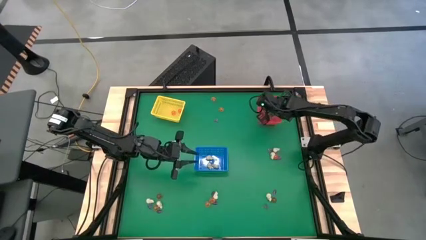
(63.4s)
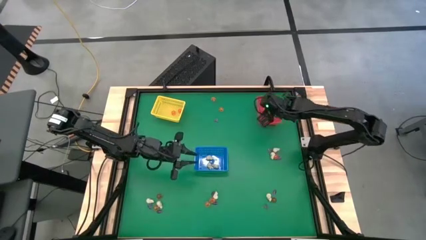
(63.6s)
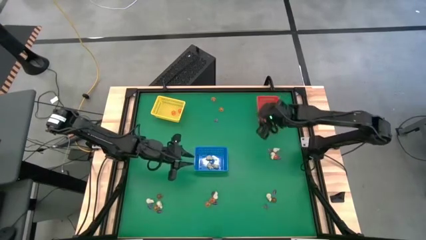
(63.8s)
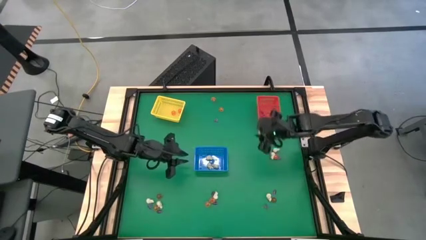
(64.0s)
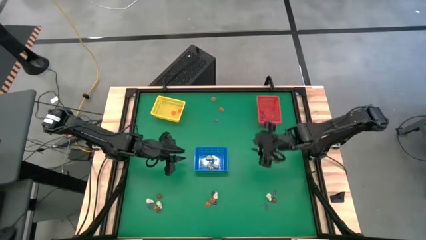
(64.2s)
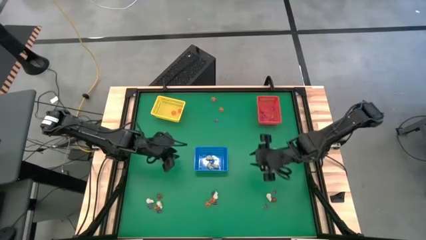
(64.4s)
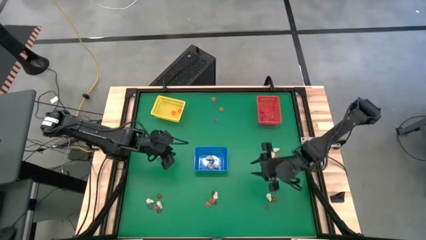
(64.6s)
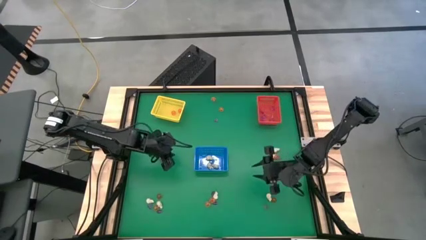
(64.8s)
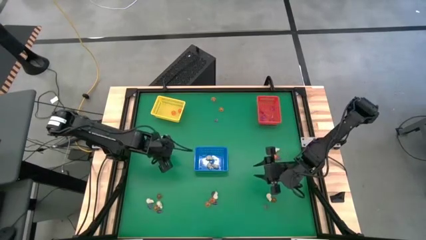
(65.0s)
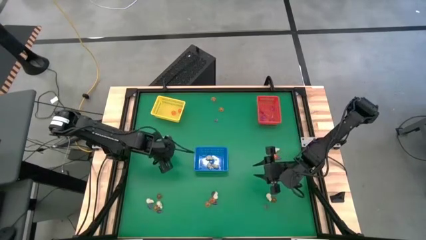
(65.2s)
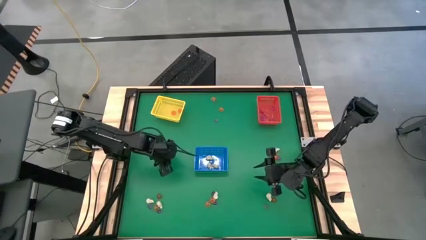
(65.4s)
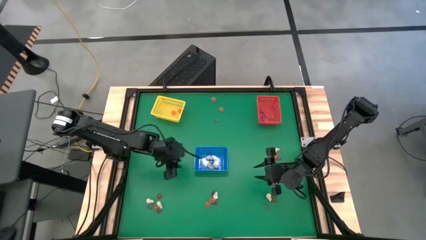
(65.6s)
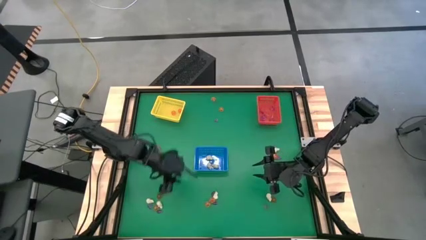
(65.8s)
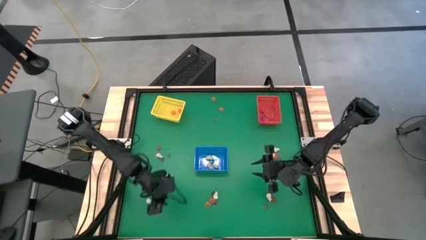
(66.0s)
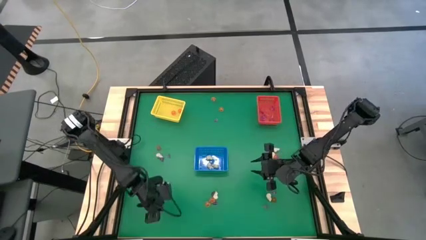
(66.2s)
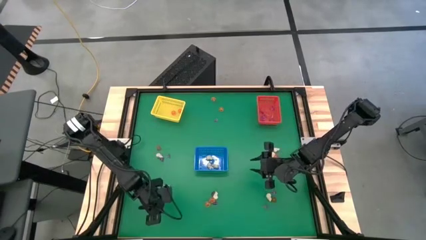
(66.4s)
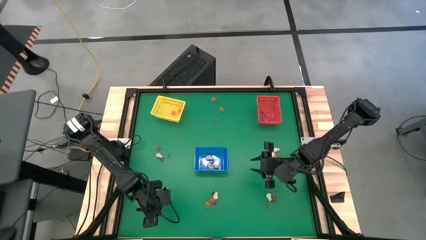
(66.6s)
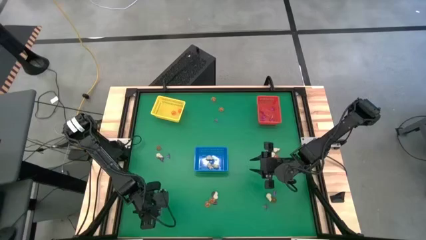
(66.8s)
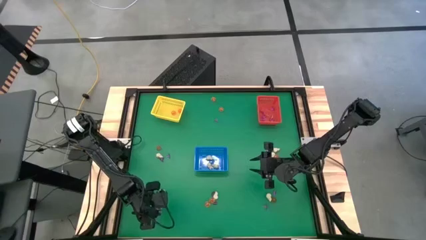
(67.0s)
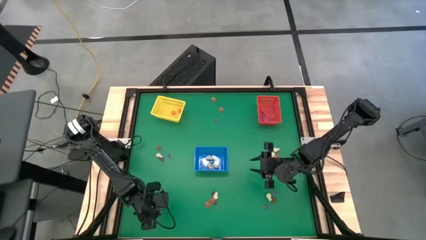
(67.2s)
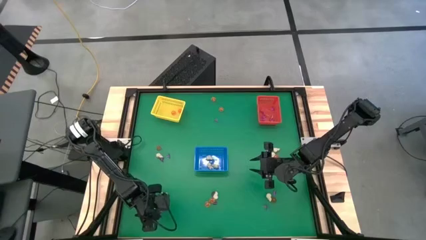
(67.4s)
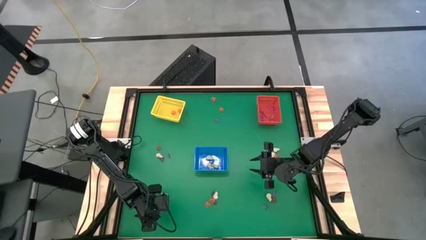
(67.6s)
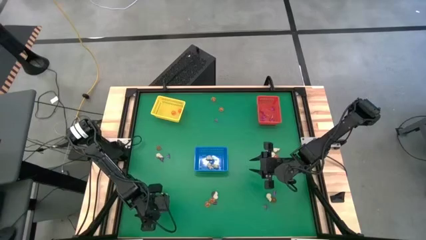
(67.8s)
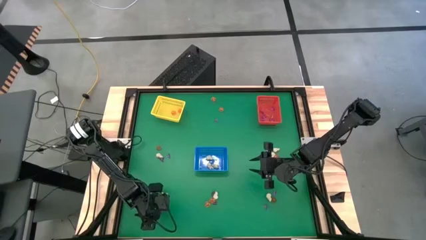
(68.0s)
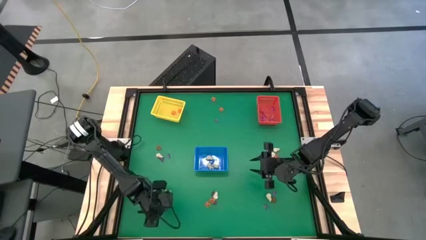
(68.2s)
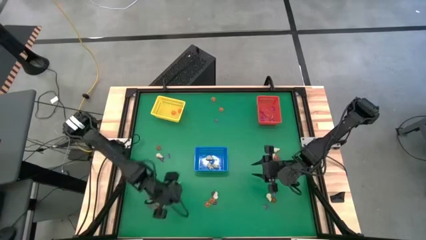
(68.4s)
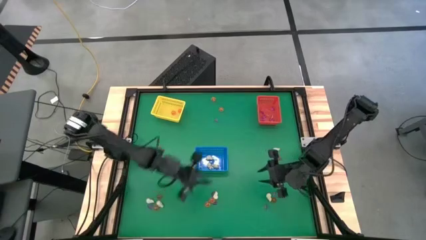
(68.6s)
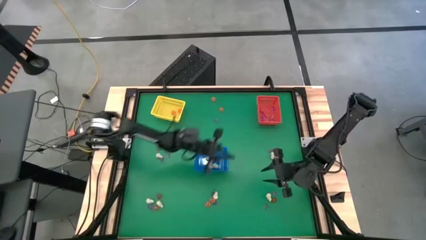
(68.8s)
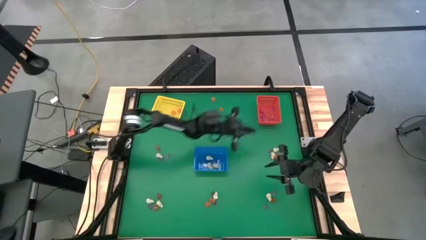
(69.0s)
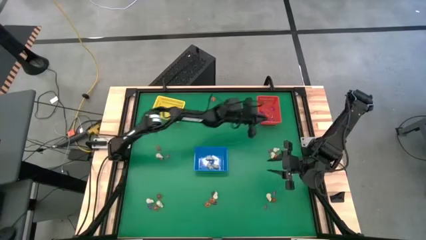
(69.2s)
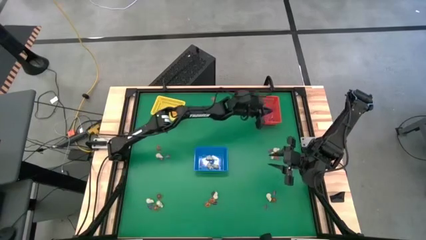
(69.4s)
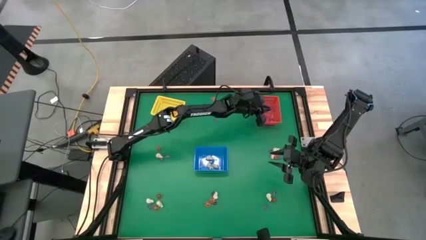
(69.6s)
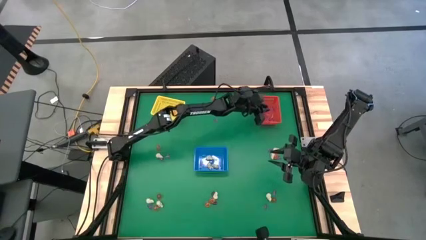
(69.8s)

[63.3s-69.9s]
Task: Sort Halloween decoration
Put the purple witch hat toy into the red bin

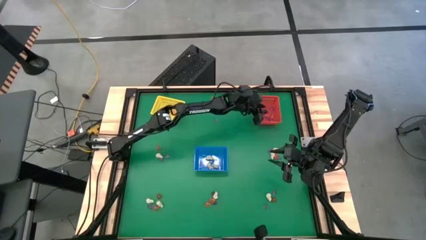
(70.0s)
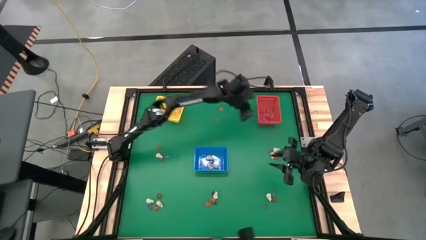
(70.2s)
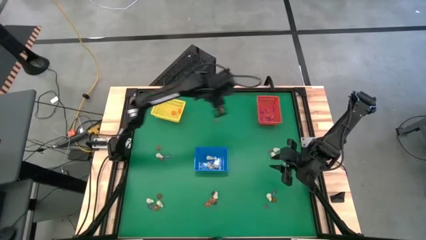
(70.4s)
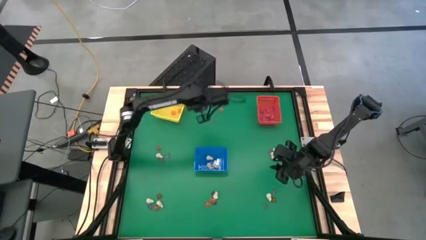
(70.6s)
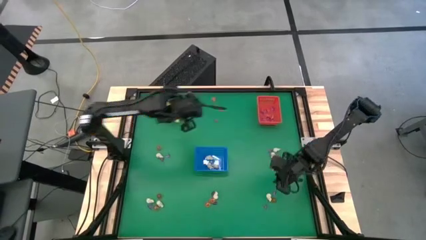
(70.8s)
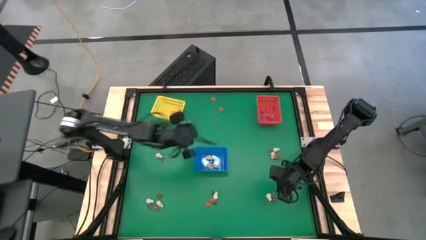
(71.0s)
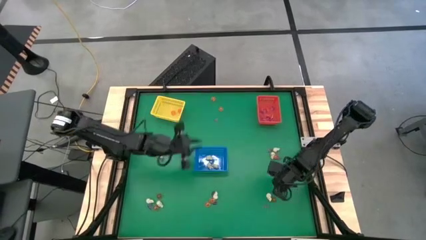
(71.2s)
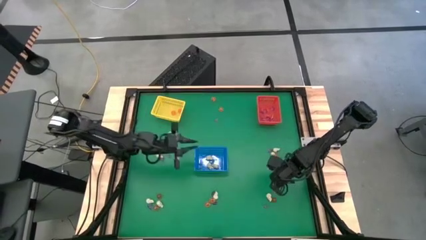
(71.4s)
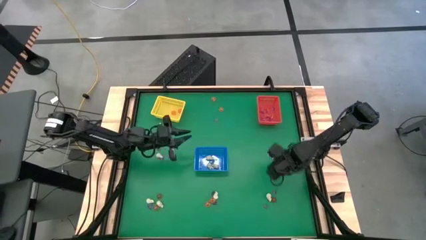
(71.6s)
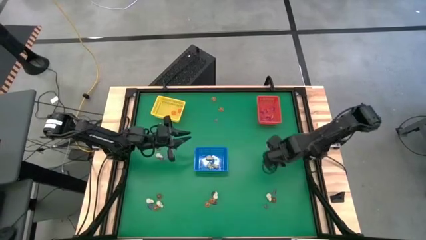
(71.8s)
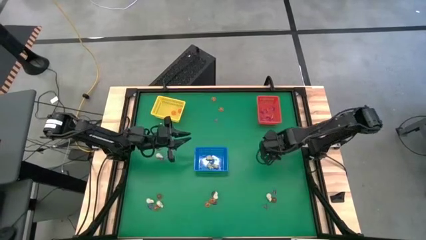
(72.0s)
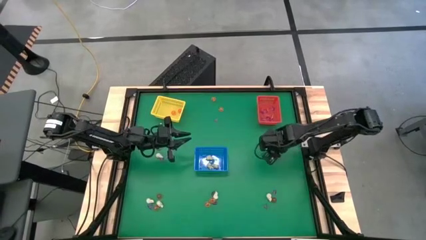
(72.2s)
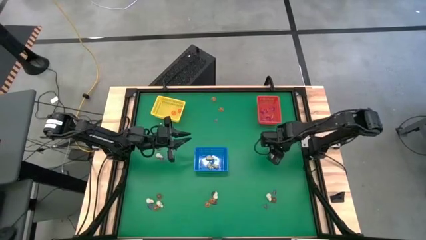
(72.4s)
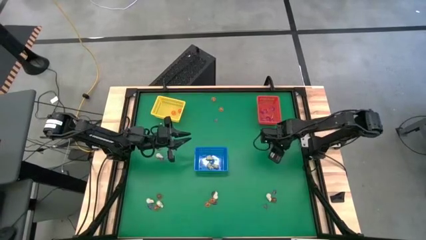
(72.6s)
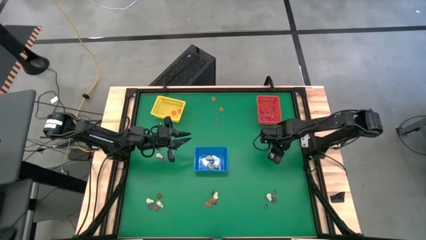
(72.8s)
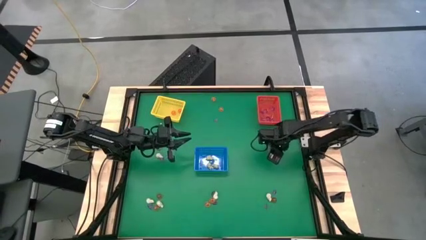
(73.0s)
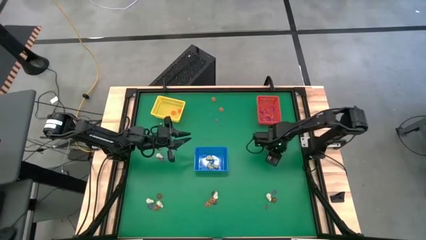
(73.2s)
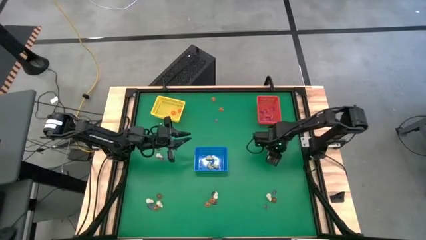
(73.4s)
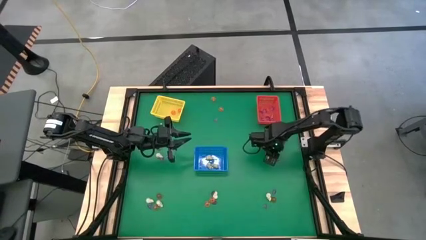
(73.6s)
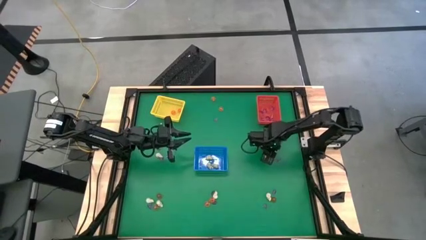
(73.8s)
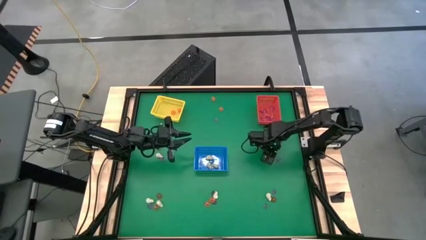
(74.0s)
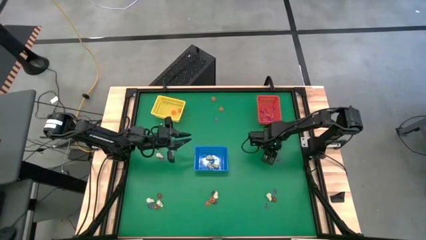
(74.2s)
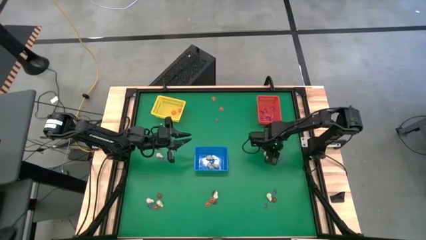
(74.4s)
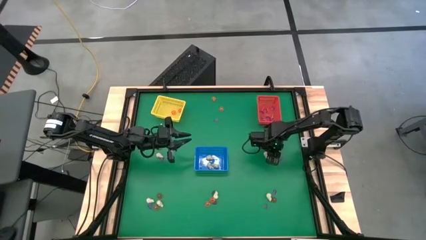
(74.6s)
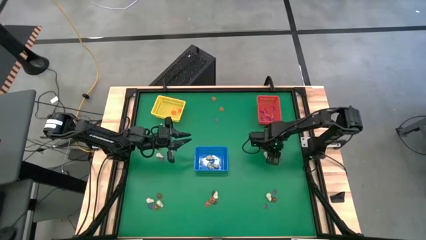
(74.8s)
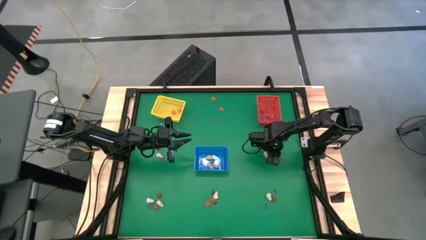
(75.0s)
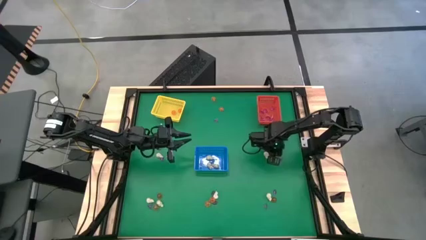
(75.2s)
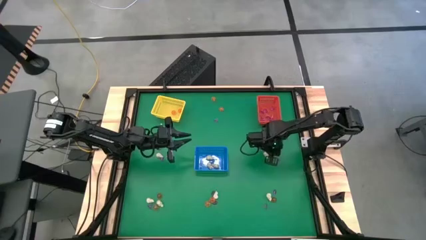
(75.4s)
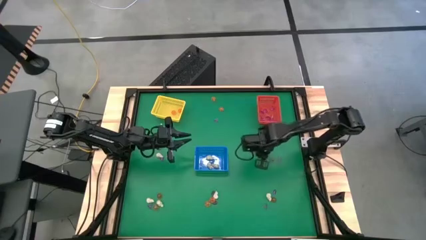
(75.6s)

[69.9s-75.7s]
Put the white skull toy into the blue bin

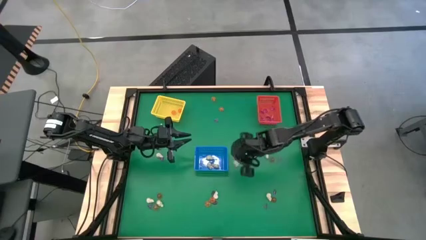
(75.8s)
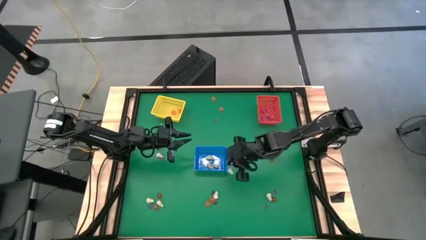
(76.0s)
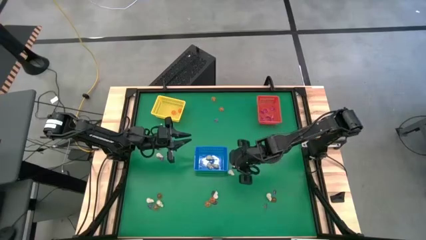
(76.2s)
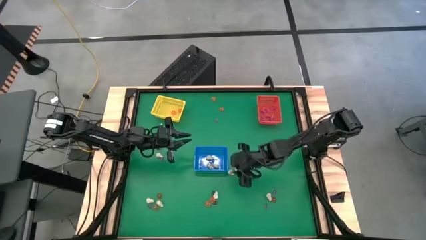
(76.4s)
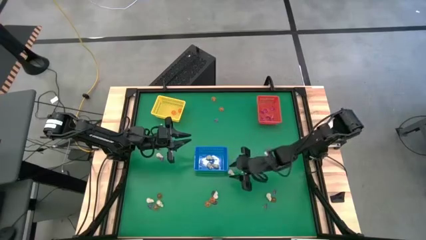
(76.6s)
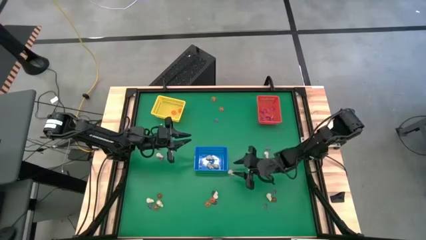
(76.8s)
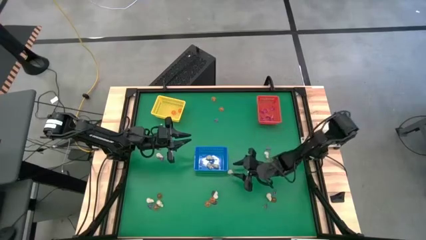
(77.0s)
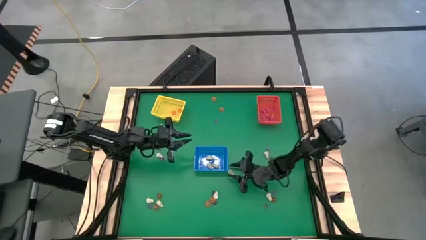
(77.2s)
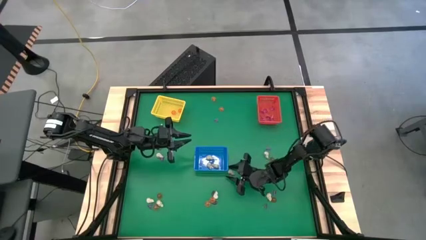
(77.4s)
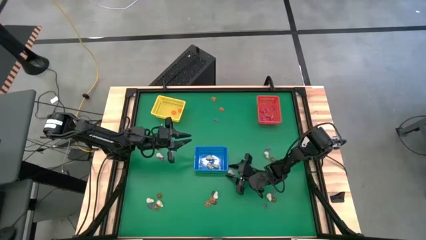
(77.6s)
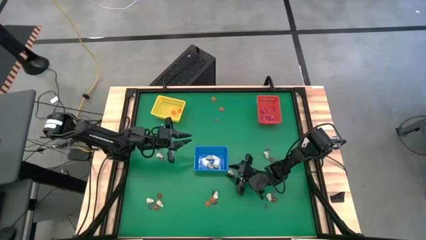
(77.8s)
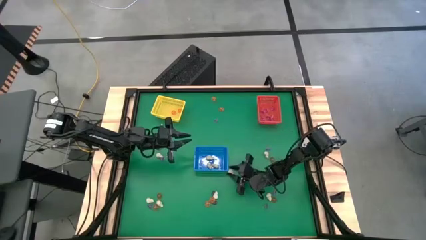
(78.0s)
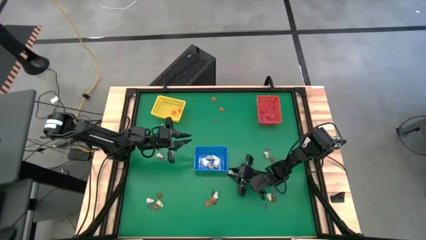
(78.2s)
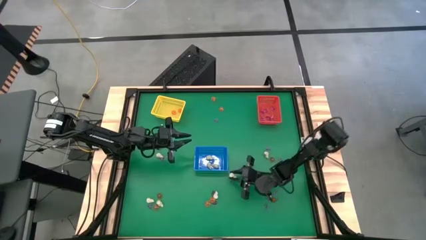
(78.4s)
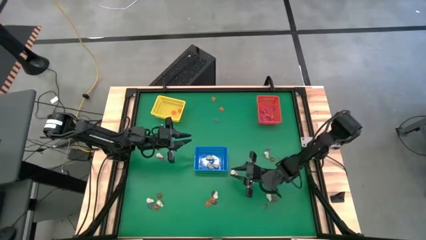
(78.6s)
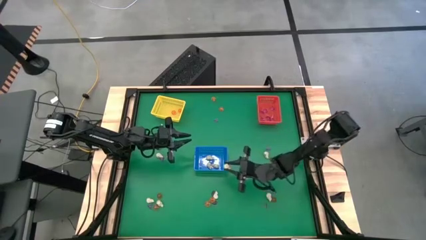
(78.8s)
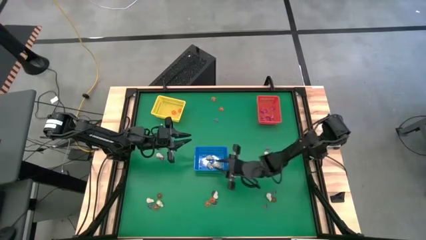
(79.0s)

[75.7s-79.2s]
Put the white skull toy into the blue bin

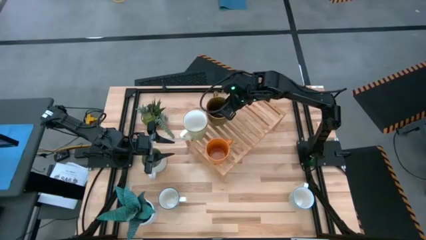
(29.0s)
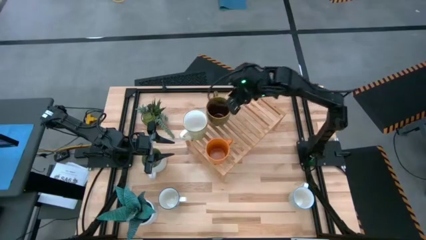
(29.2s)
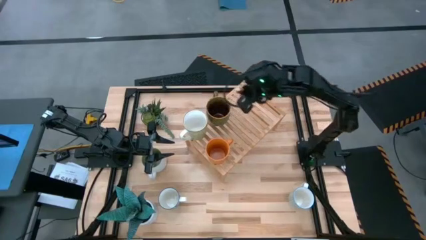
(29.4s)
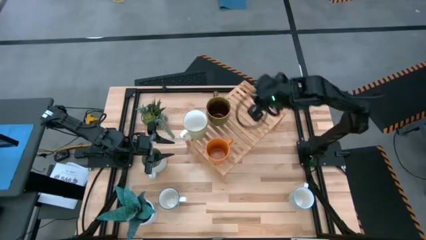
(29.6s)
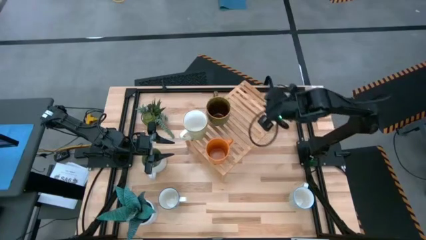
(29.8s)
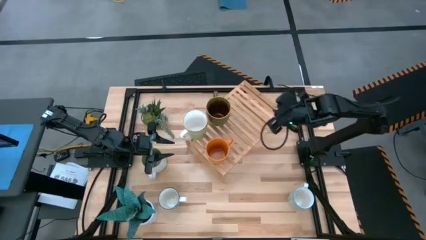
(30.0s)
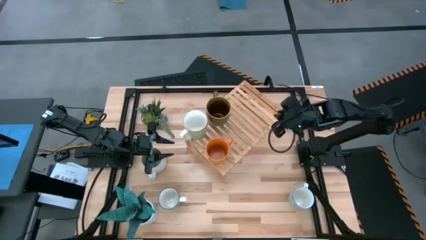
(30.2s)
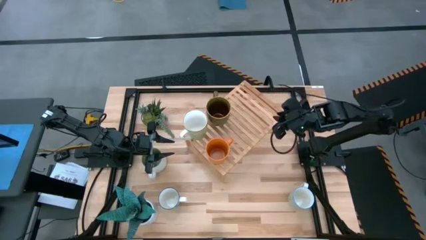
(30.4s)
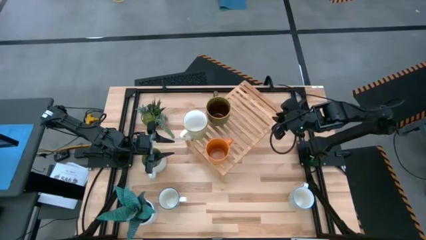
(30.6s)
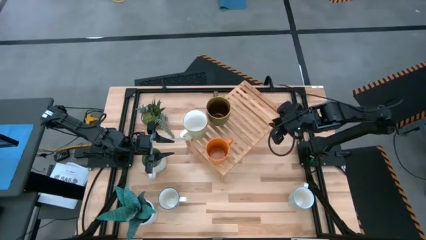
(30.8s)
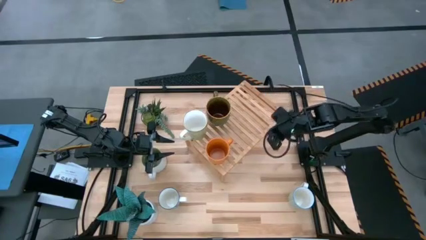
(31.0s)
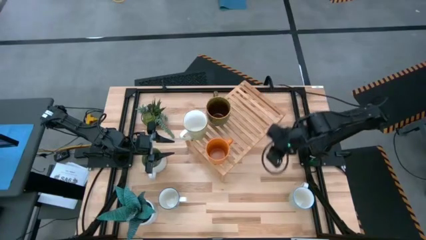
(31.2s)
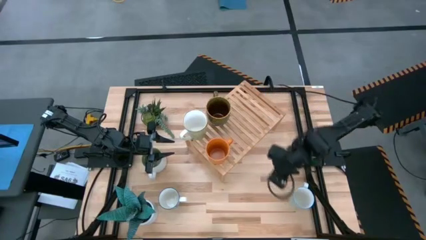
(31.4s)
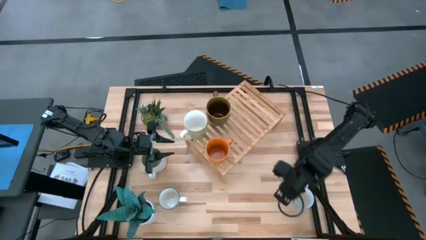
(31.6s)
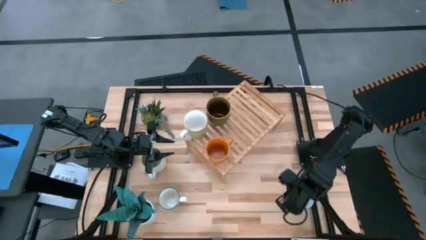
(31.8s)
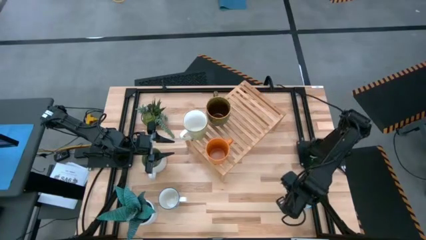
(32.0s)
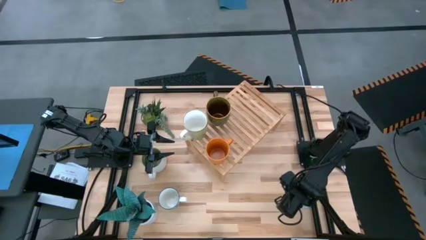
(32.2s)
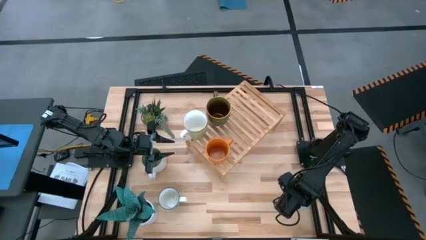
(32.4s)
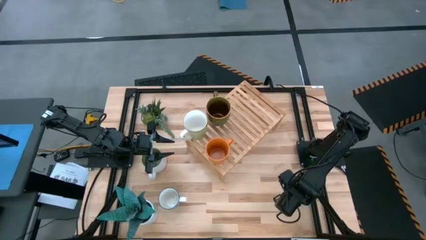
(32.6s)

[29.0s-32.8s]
Task: Place coffee mugs
Put the light blue mug on the shelf
